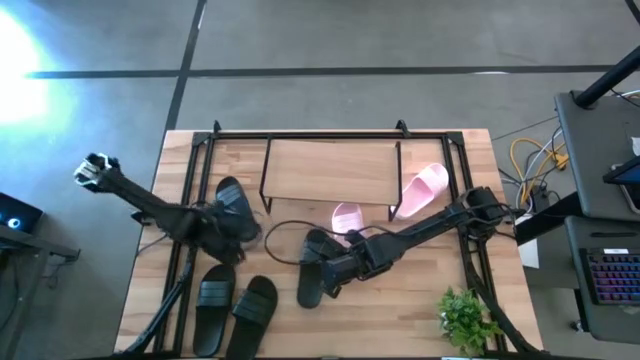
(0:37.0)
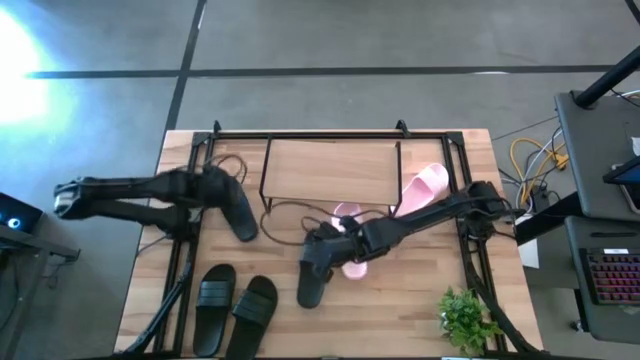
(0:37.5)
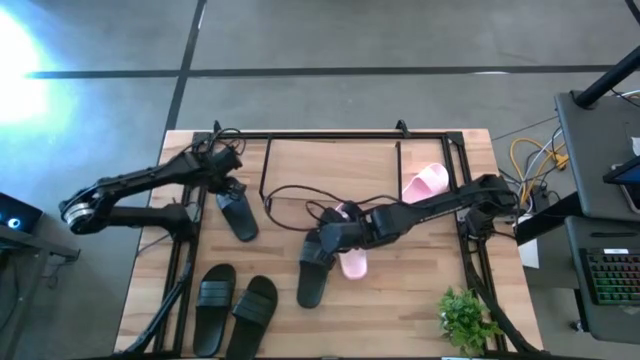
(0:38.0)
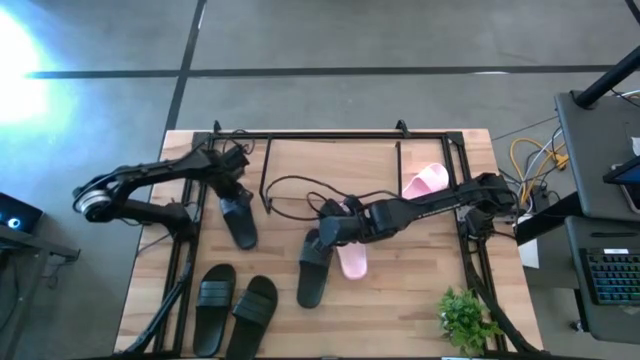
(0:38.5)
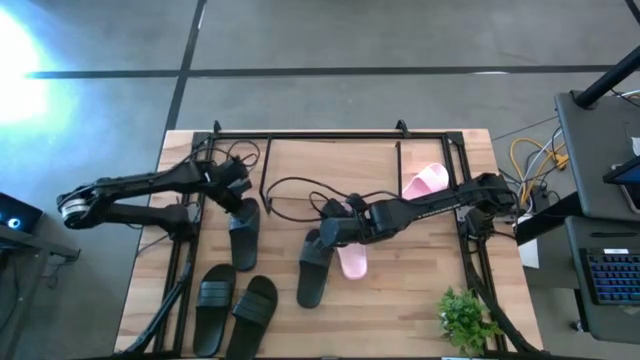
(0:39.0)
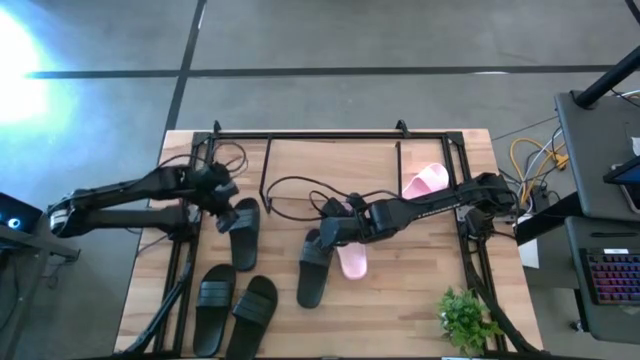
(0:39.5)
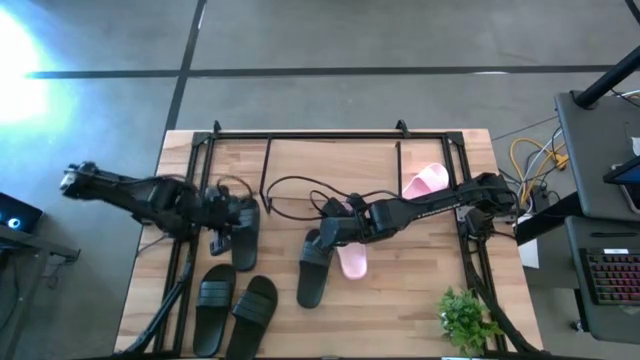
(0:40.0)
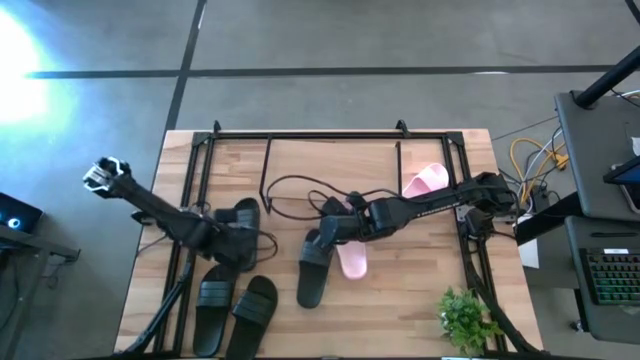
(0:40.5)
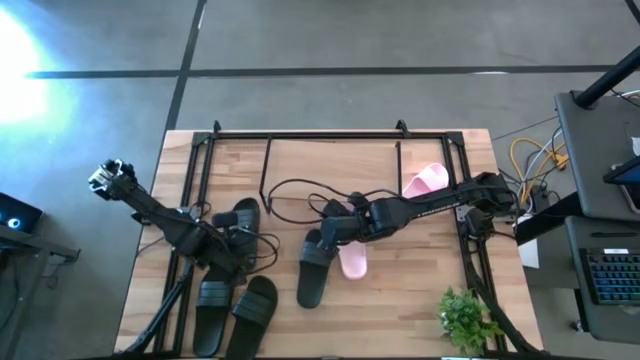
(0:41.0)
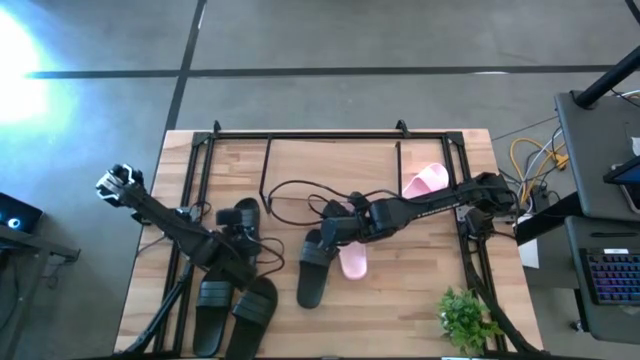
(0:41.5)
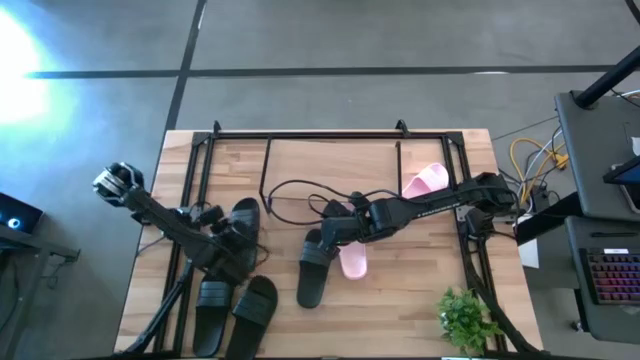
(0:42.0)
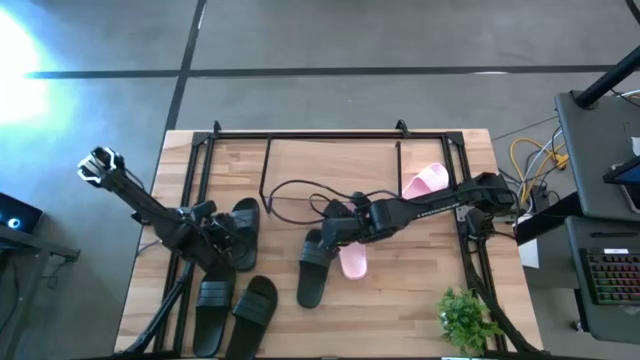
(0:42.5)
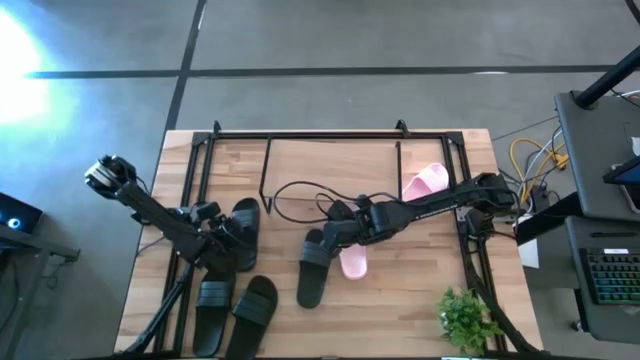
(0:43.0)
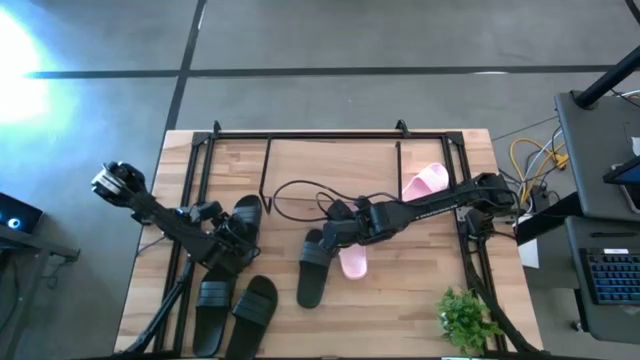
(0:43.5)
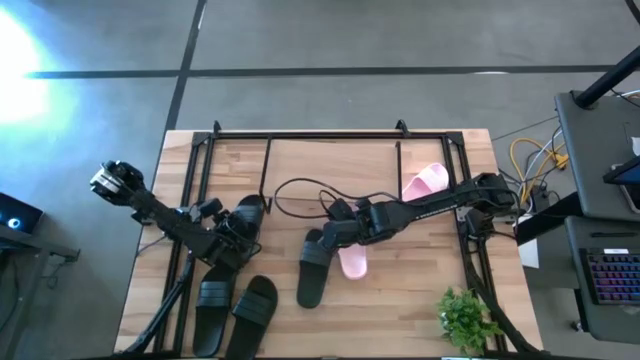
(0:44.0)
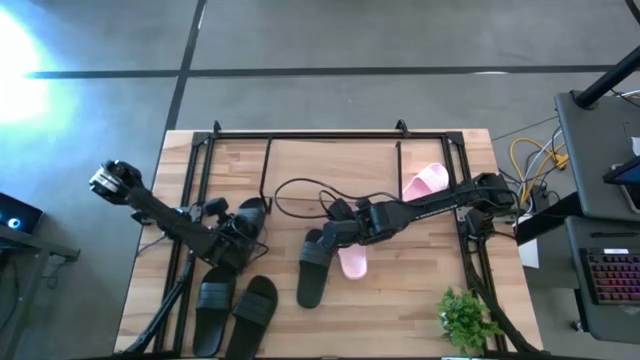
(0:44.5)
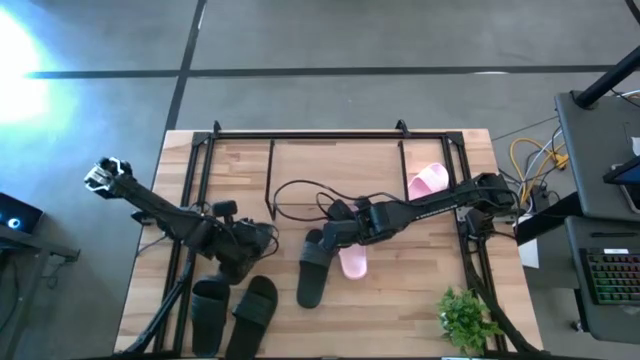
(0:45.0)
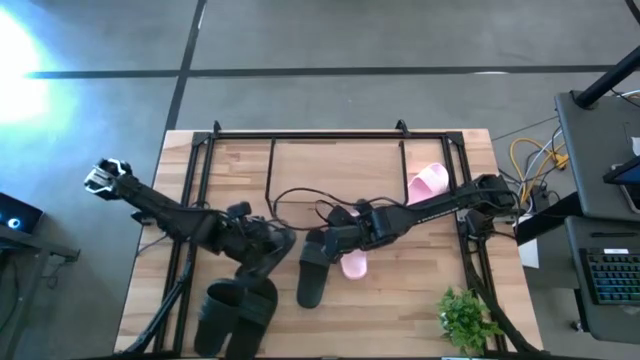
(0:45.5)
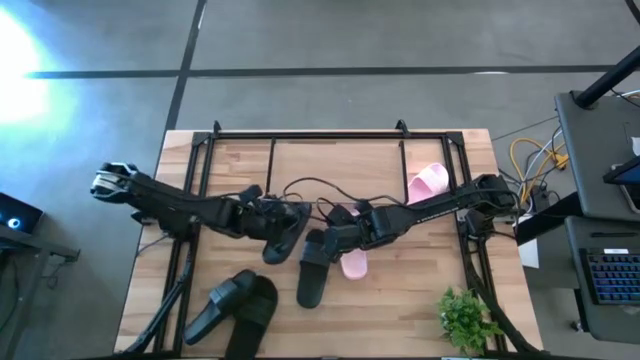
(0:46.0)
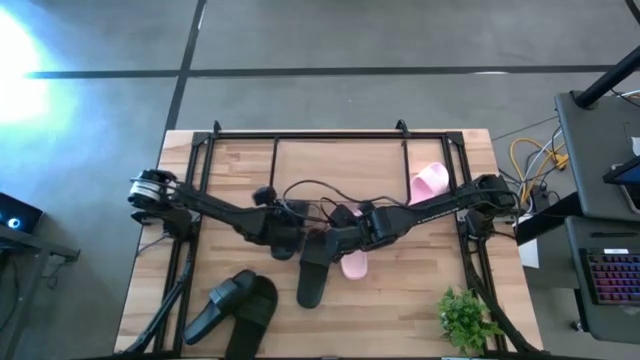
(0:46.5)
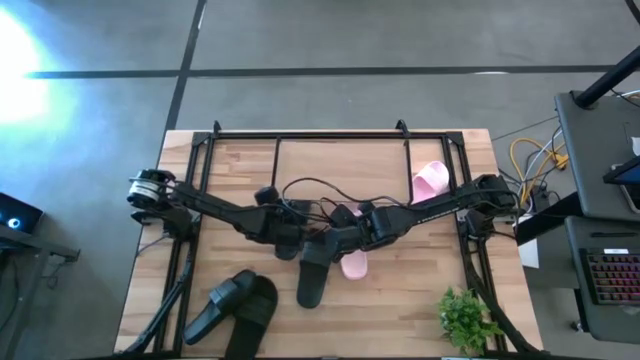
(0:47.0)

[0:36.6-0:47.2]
Task: Pick and place slides into the shelf
Put the black slides under the shelf

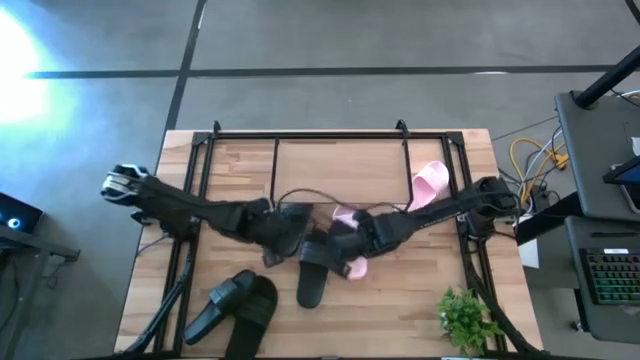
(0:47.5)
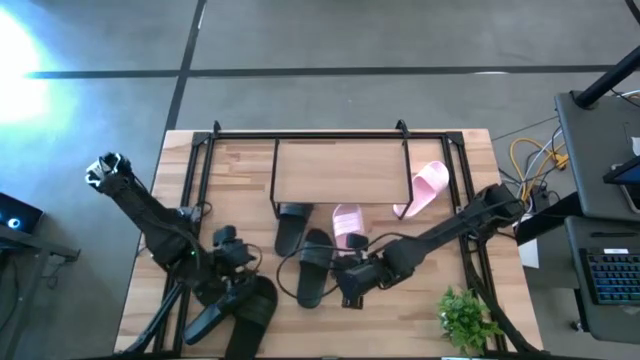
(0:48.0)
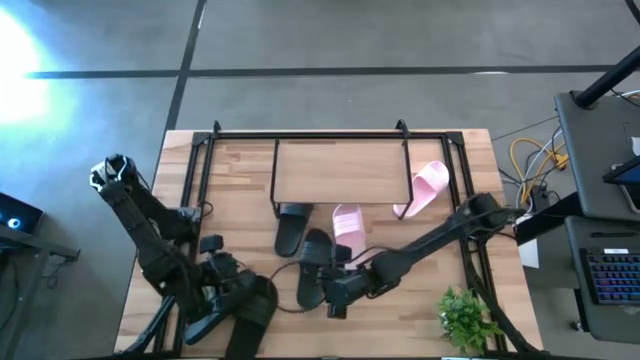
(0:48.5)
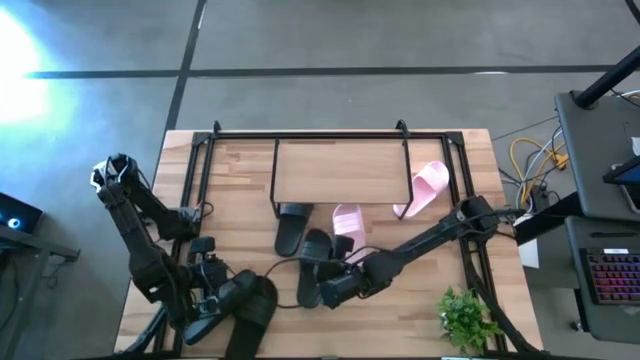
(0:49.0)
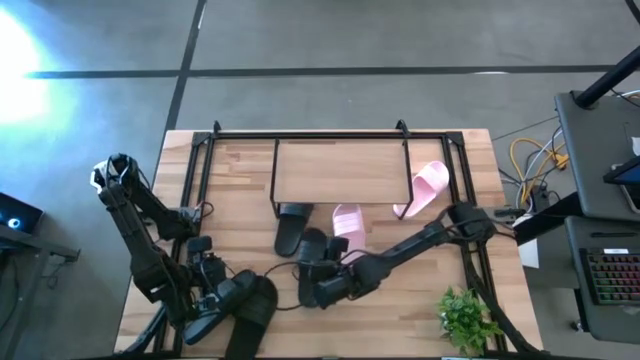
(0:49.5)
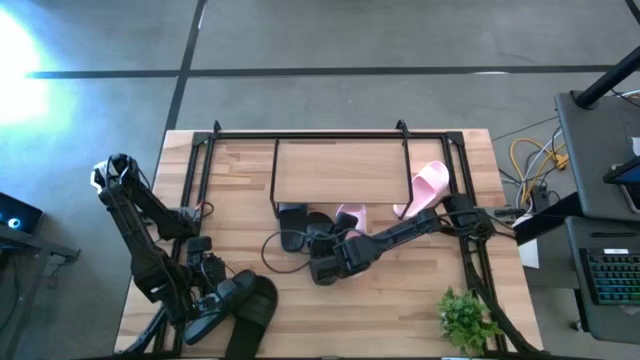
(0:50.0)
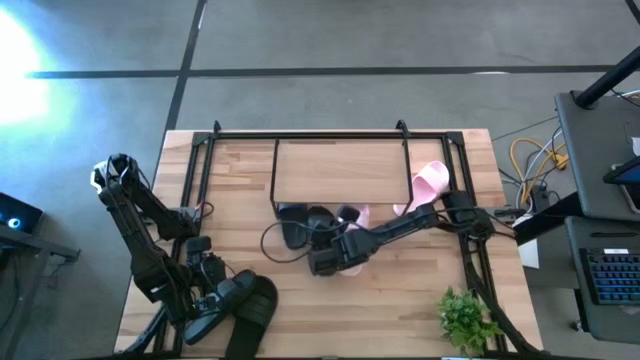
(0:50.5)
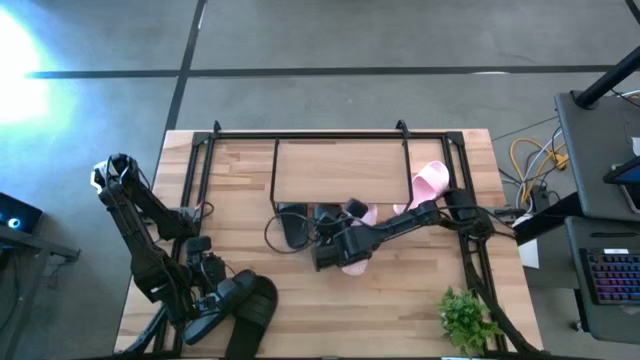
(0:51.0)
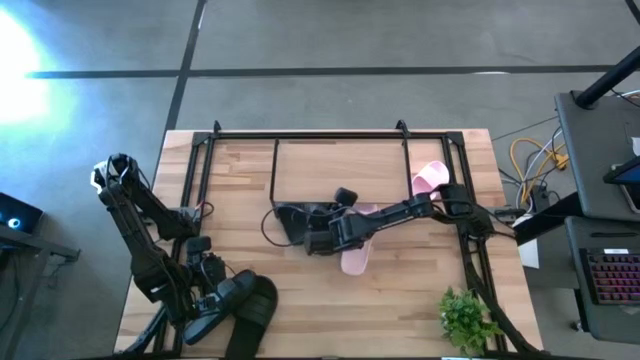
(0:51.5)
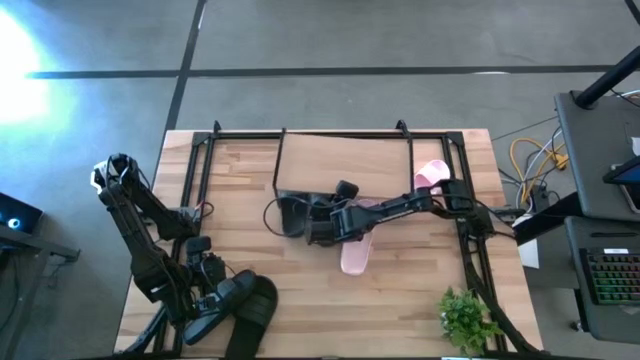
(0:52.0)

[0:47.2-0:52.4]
Put the black slides under the shelf

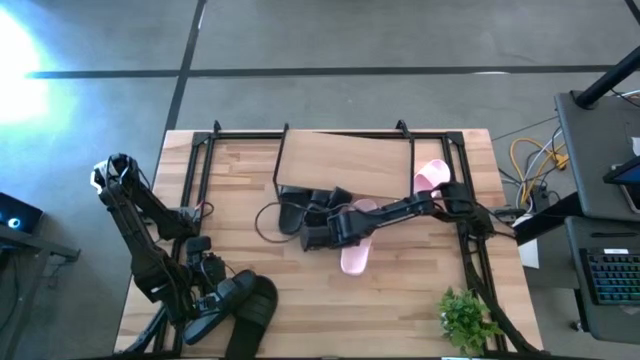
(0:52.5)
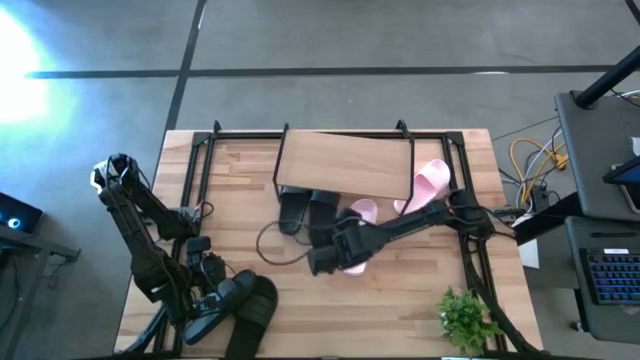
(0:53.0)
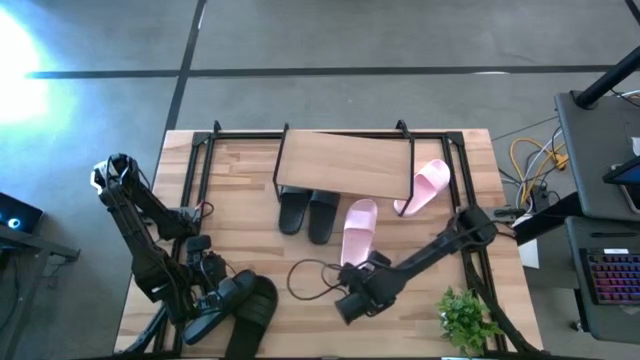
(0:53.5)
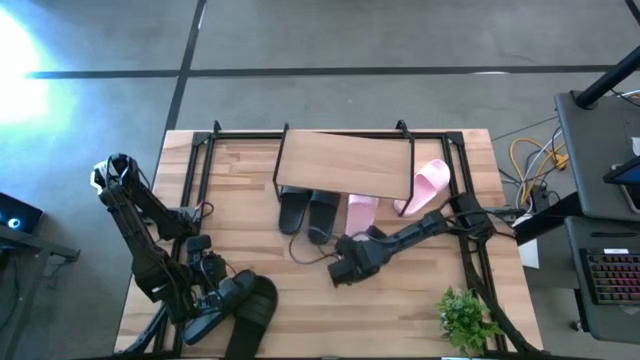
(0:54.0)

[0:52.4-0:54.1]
Put the pink slides under the shelf

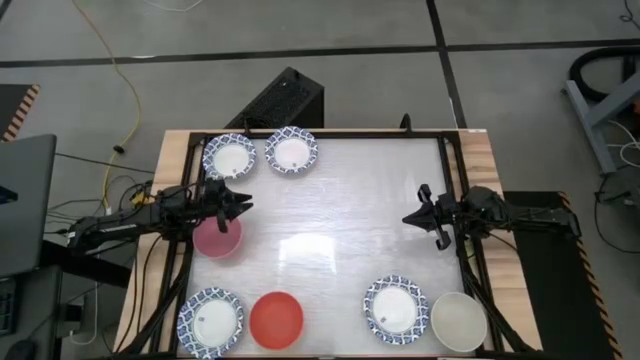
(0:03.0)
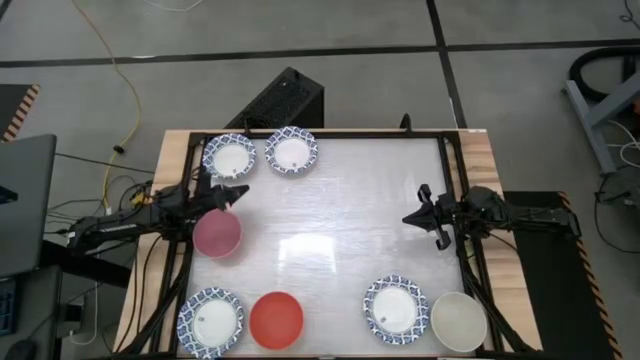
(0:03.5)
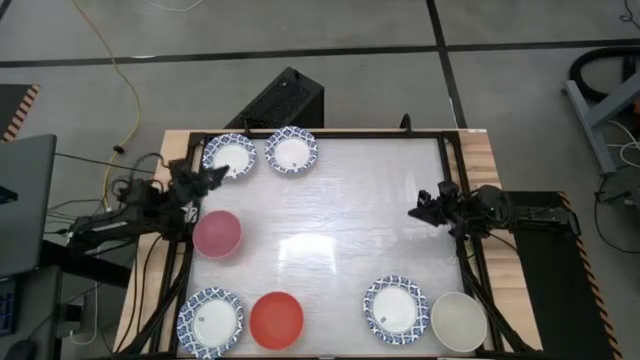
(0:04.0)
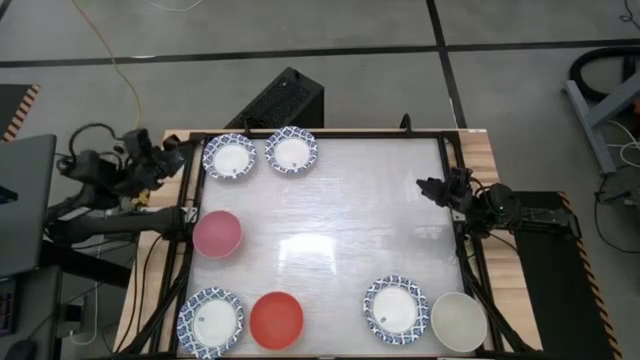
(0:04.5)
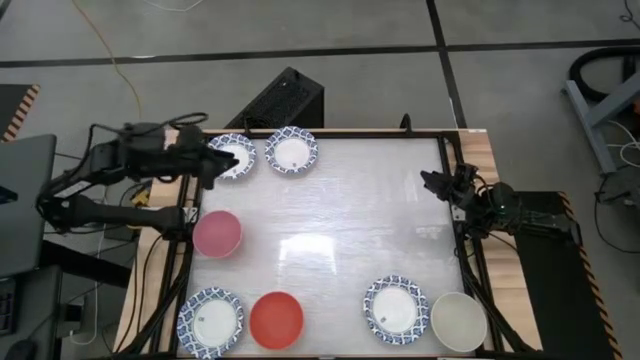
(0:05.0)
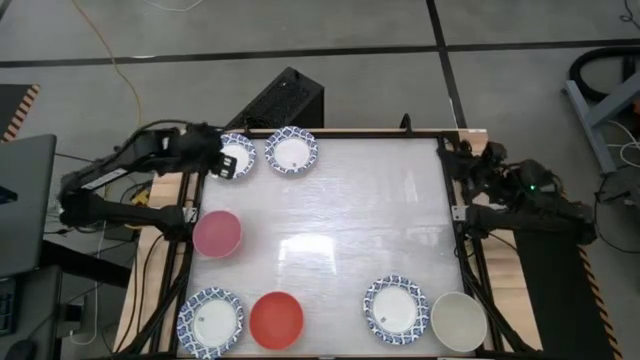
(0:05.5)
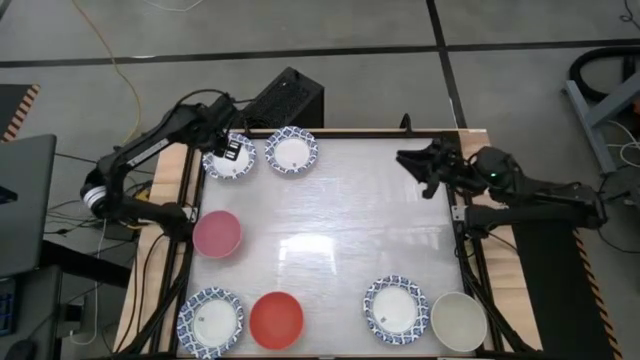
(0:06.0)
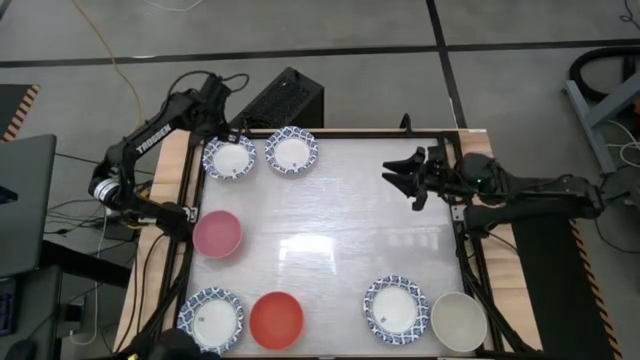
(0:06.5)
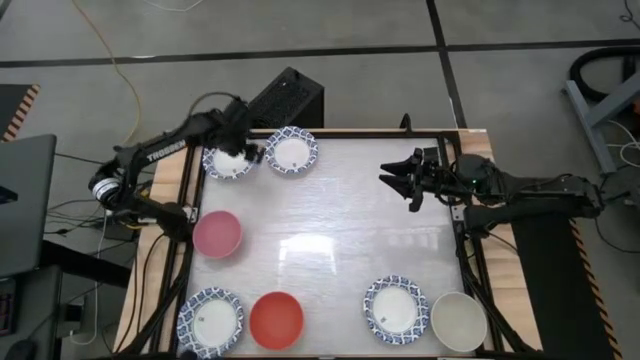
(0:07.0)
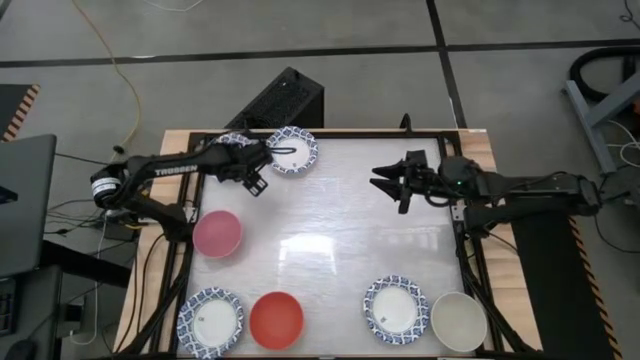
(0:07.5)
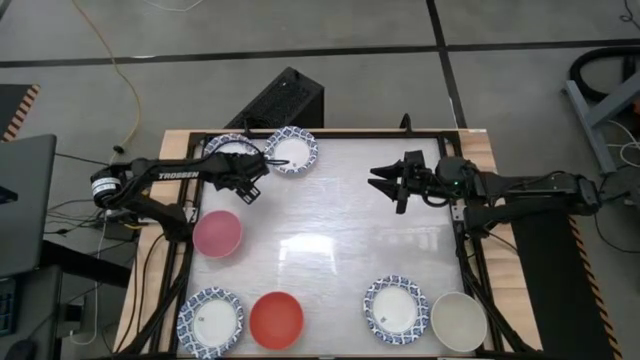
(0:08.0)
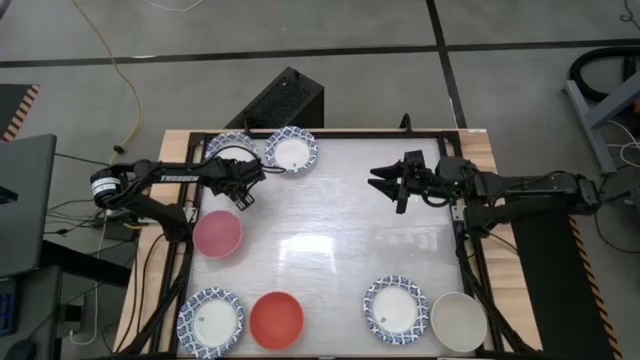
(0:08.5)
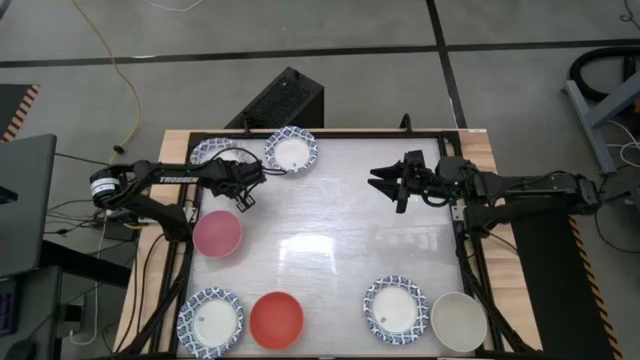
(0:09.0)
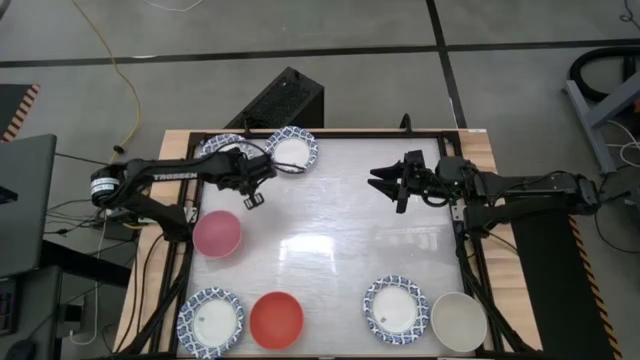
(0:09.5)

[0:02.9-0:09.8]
Task: Nest bowls inside each other by size order
Stack the white bowl onto the other white bowl
